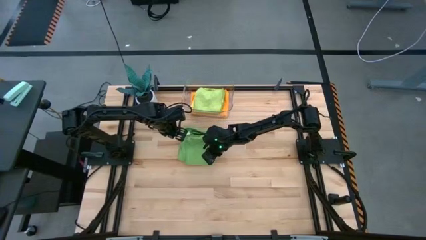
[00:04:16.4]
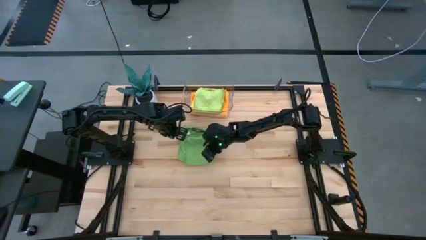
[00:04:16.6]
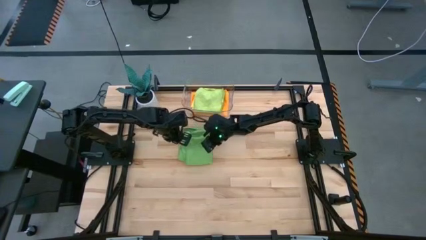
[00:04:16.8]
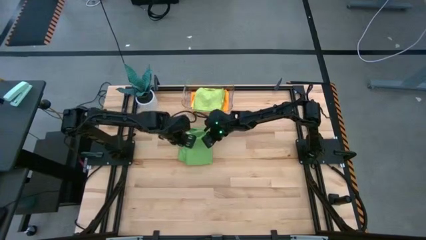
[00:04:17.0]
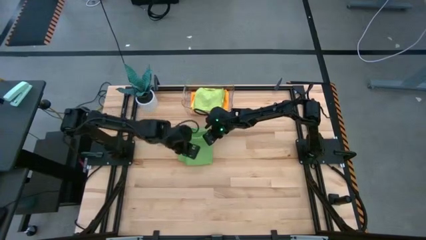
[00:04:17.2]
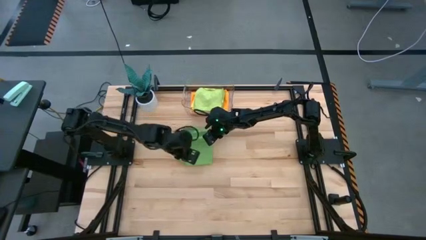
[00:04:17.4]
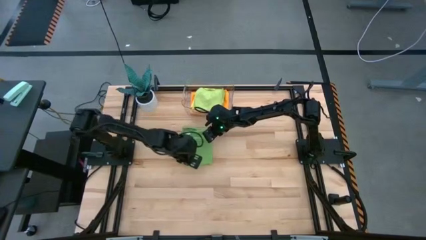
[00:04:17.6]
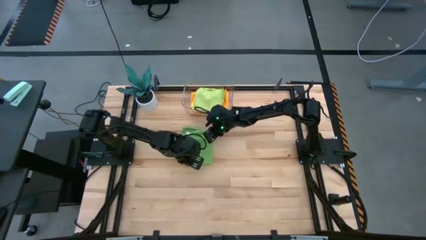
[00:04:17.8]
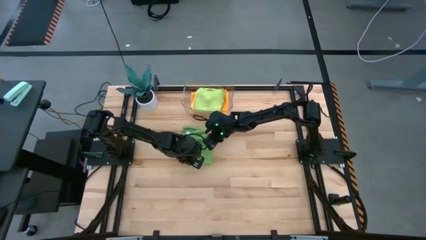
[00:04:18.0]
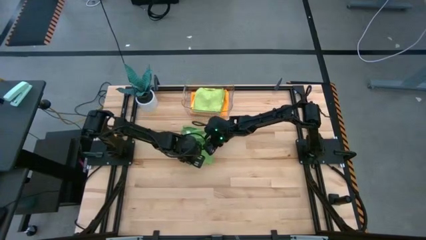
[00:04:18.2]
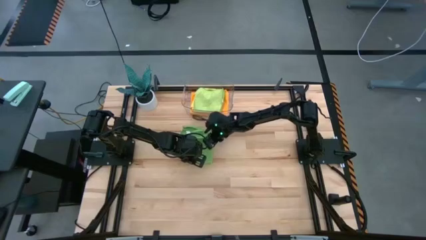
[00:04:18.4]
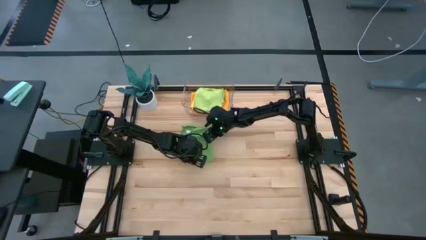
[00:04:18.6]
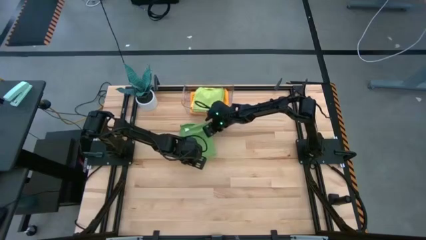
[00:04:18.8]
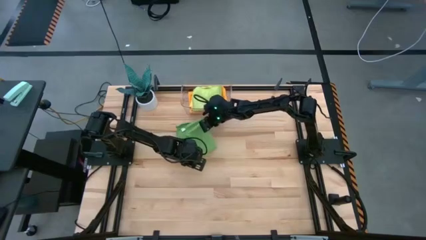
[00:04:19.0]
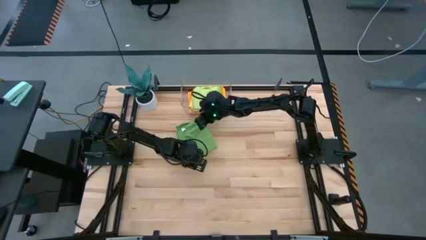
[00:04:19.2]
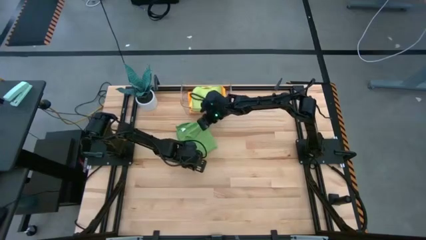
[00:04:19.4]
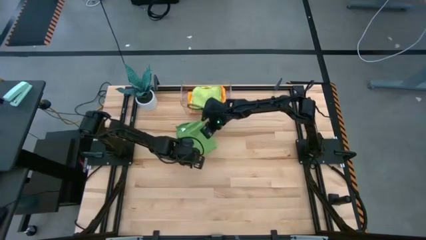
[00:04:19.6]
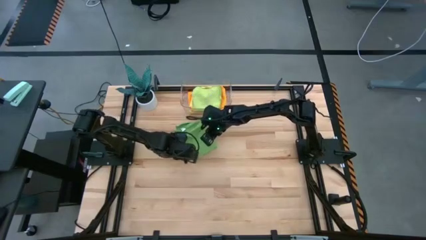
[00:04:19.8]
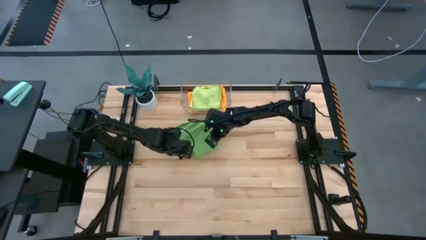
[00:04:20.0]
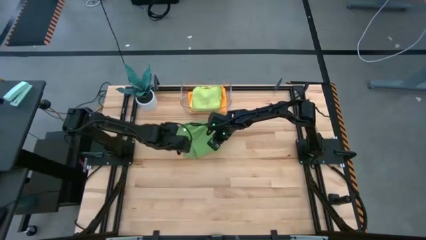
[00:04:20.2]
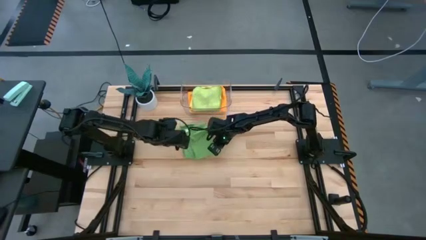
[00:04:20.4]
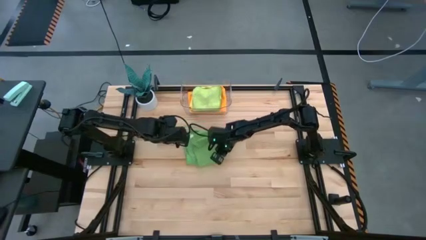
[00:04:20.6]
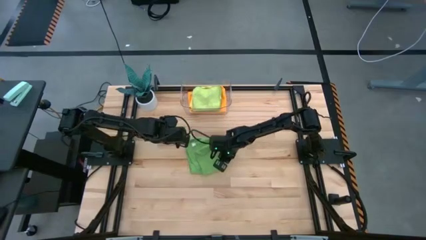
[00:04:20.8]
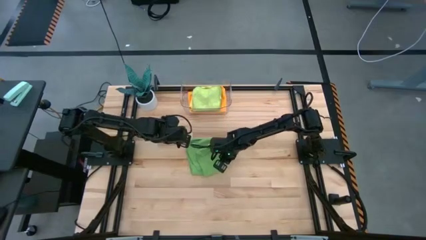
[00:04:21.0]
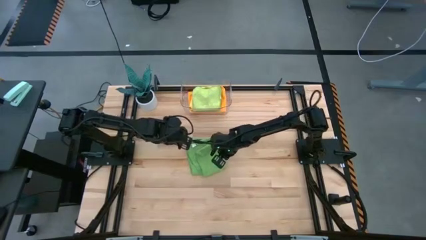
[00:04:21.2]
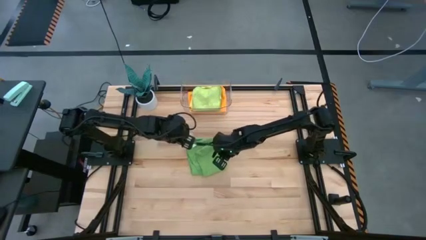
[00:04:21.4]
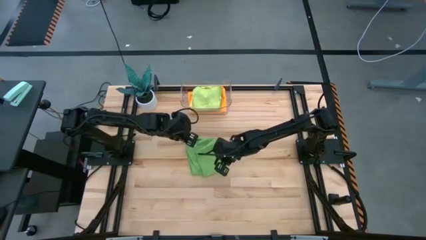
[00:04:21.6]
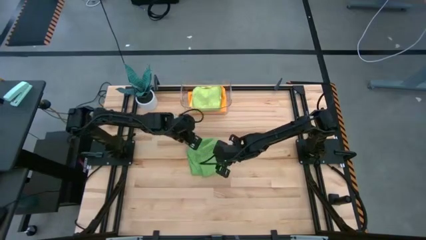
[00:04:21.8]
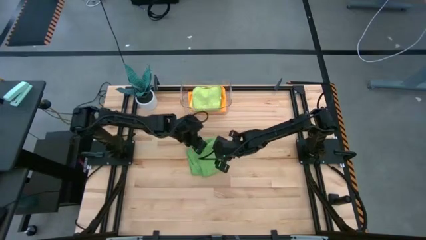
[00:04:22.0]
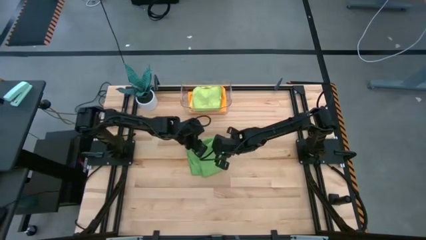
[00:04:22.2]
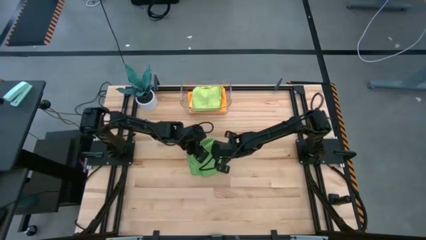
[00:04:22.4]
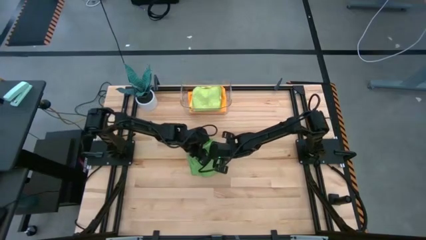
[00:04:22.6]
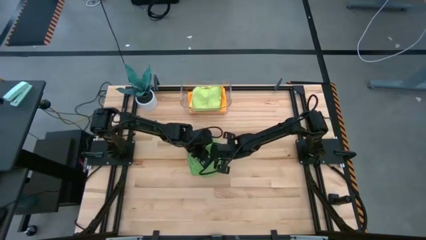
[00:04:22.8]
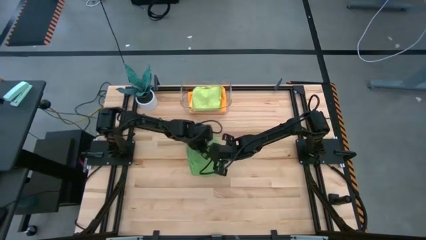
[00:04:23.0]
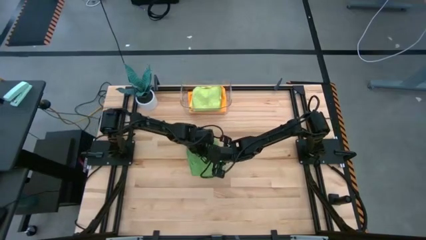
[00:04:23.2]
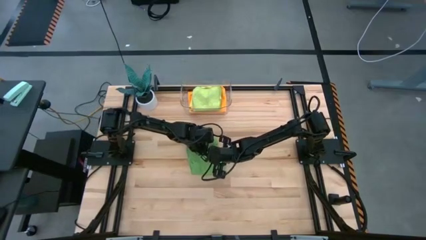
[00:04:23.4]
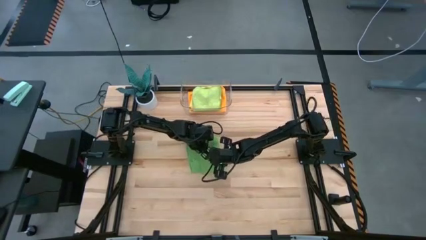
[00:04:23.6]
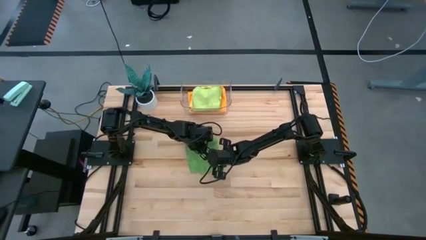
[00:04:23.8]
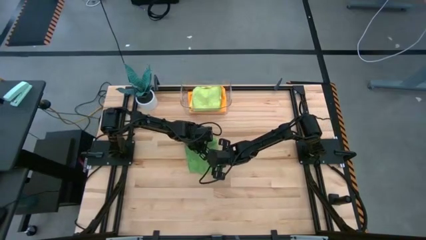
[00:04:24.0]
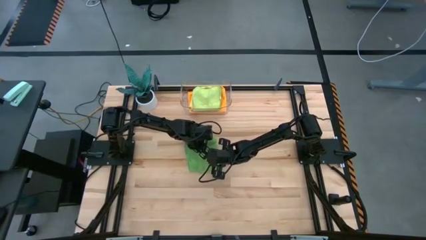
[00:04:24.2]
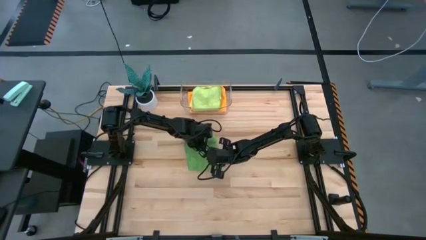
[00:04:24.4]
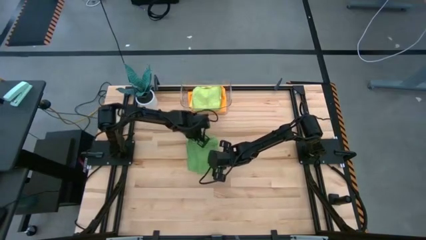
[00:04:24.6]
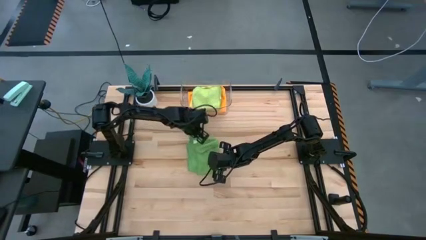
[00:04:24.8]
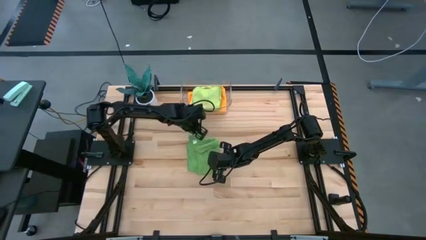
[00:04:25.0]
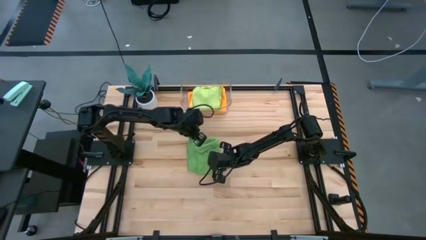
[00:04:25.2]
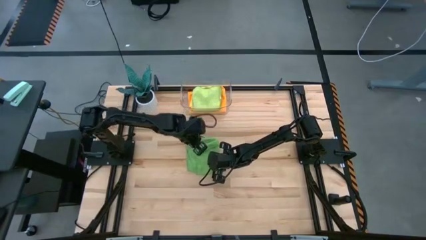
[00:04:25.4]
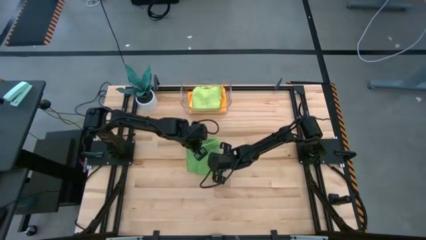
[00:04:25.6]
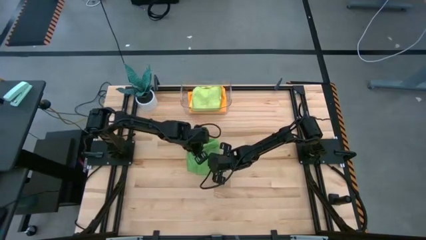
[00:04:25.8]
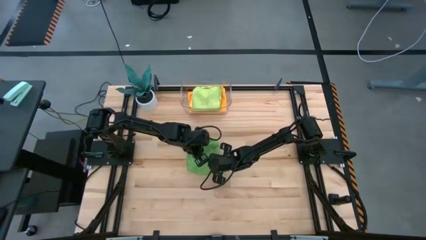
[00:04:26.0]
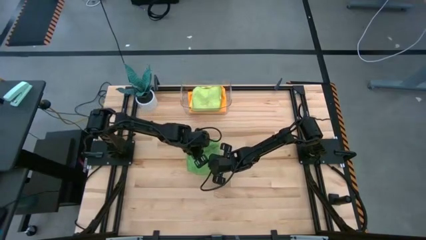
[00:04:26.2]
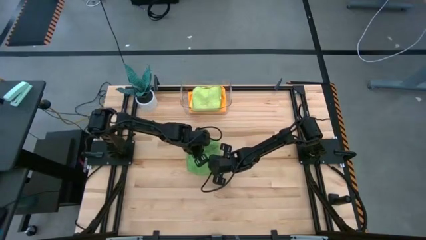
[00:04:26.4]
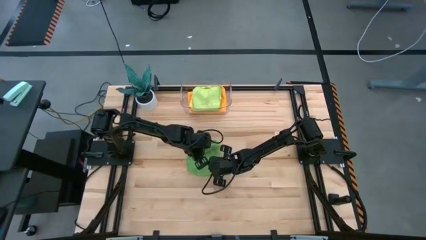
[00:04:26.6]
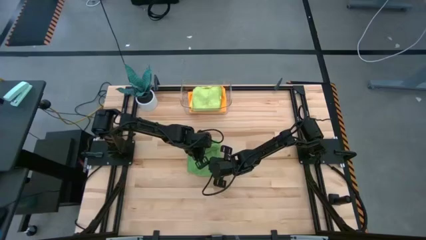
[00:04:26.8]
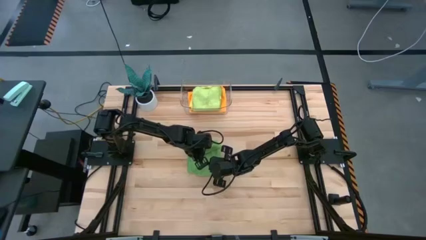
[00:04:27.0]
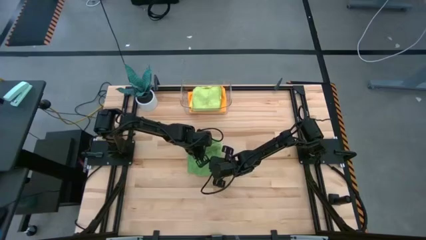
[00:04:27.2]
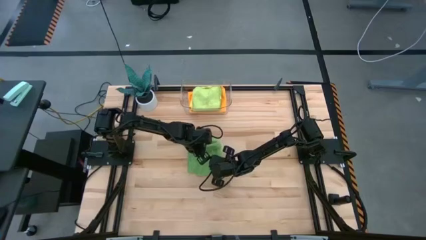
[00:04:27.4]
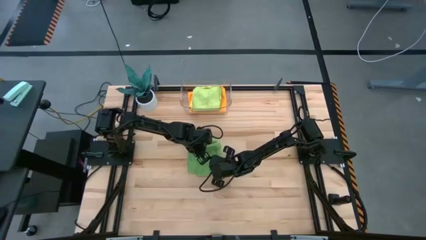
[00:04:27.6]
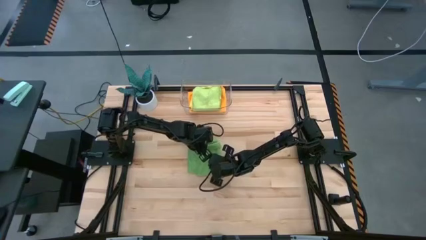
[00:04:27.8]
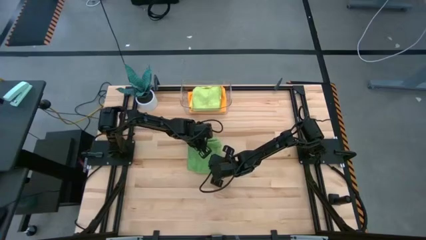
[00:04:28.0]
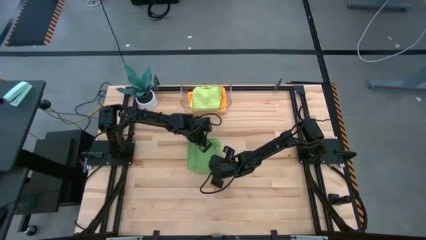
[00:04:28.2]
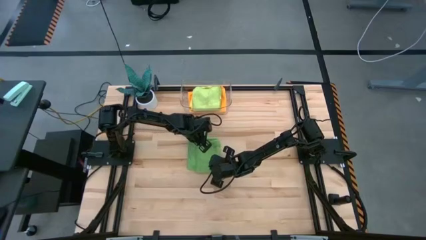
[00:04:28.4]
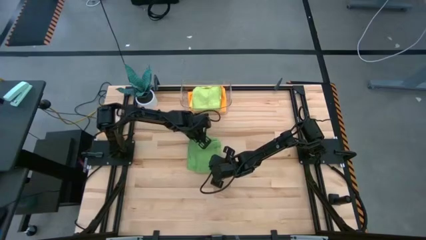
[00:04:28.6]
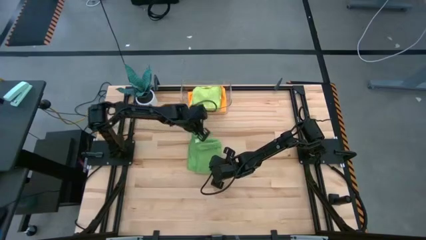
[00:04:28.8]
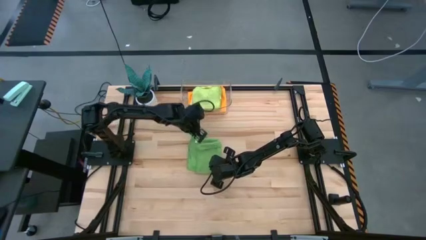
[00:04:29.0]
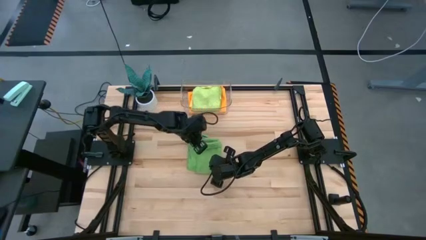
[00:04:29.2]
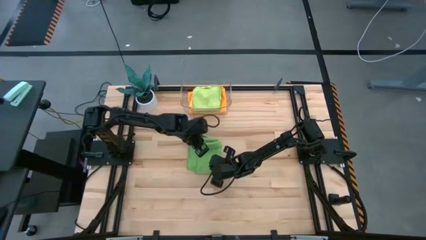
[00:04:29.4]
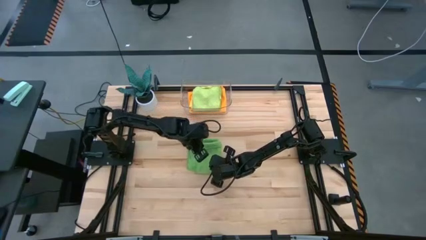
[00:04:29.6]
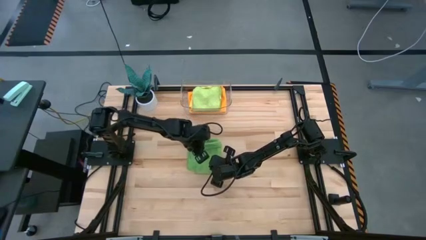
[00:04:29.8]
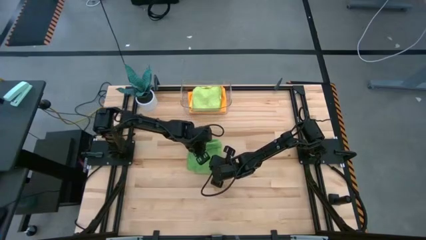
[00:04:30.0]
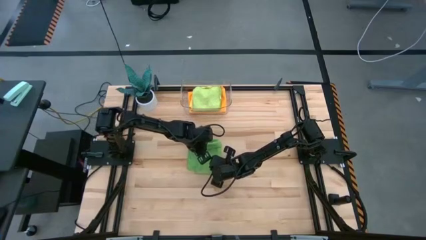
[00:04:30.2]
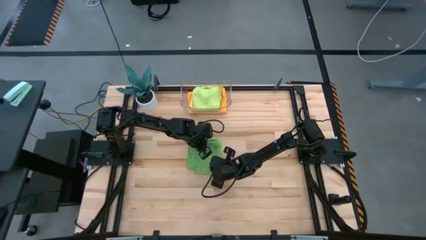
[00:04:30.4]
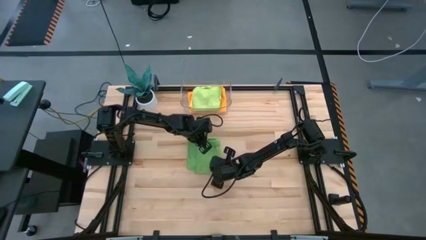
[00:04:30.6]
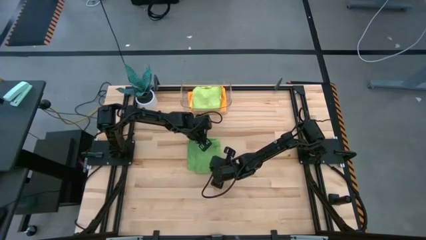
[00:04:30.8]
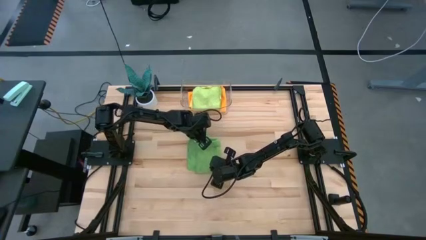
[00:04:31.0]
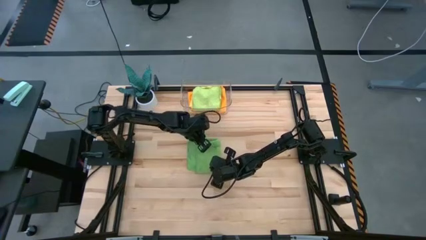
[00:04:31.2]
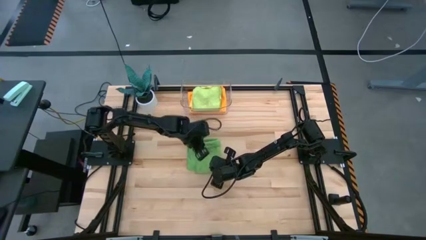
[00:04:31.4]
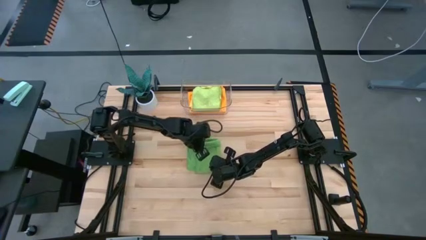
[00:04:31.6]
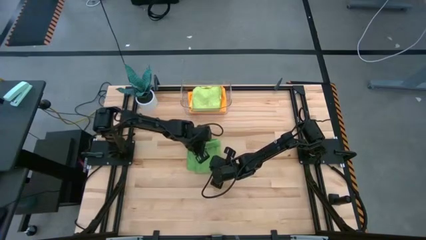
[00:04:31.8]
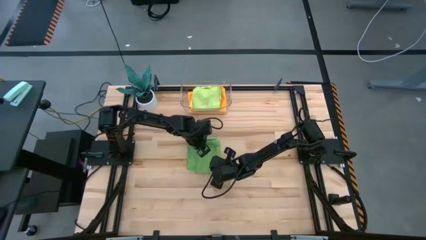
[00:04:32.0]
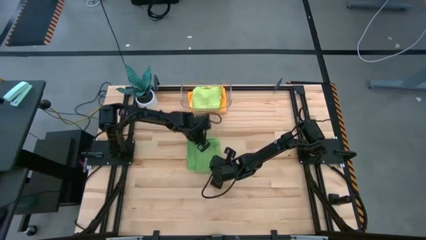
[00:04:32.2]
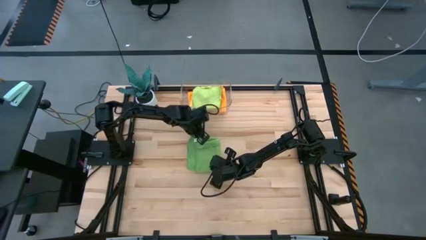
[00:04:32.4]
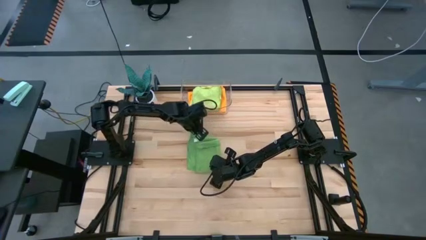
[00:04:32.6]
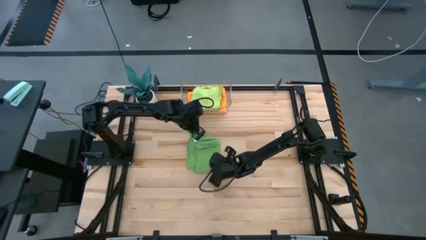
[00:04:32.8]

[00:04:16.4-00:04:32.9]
Task: Fold microfiber towels
Fold the green towel
